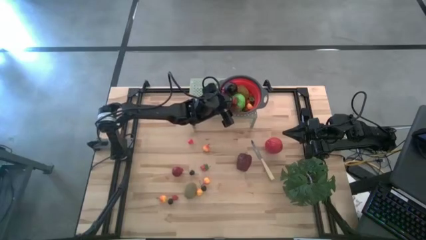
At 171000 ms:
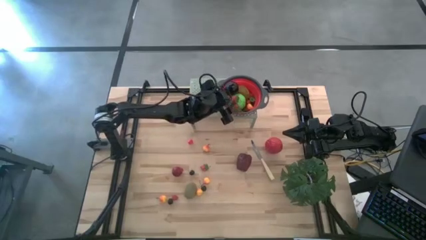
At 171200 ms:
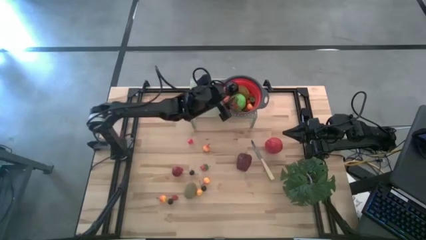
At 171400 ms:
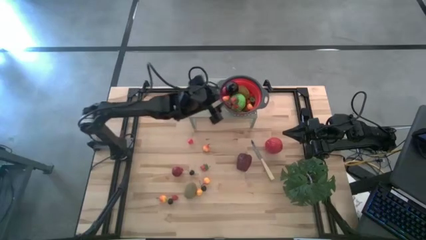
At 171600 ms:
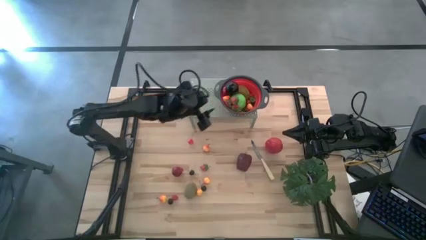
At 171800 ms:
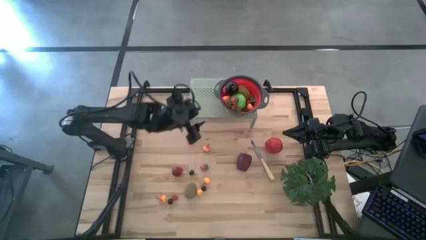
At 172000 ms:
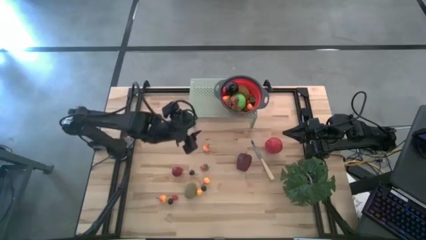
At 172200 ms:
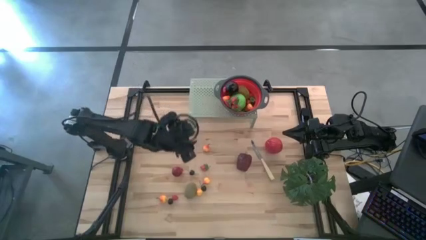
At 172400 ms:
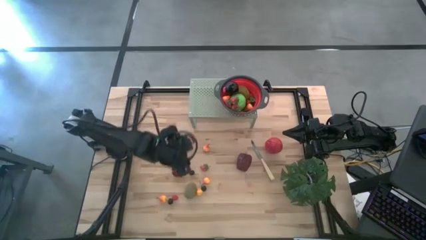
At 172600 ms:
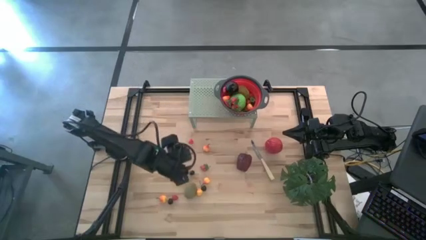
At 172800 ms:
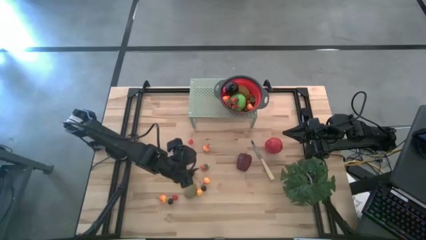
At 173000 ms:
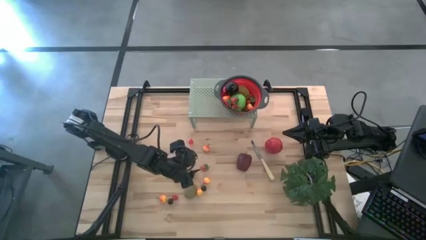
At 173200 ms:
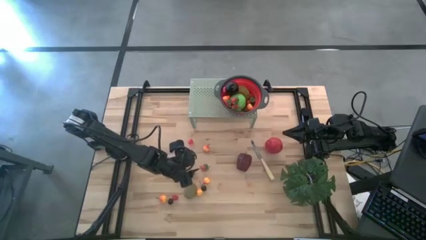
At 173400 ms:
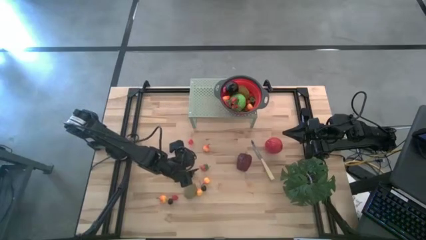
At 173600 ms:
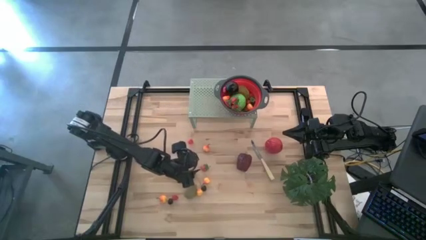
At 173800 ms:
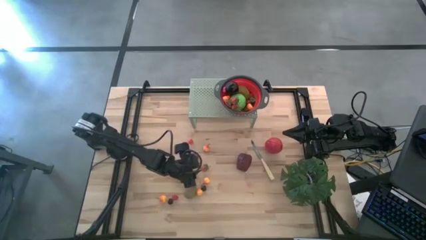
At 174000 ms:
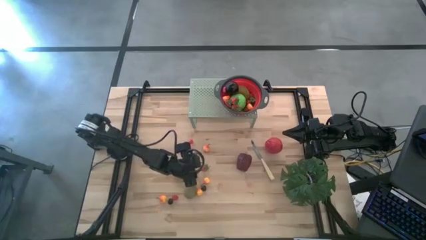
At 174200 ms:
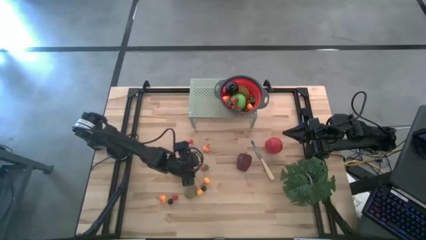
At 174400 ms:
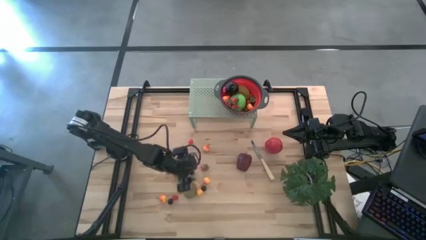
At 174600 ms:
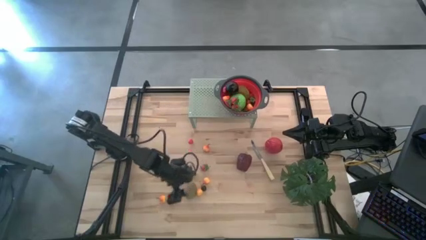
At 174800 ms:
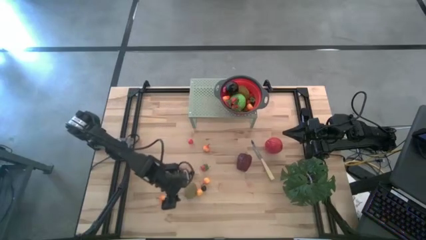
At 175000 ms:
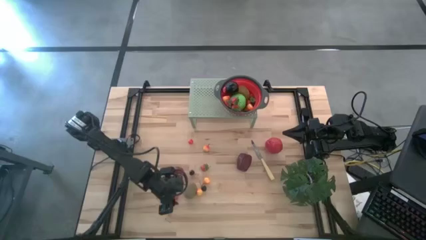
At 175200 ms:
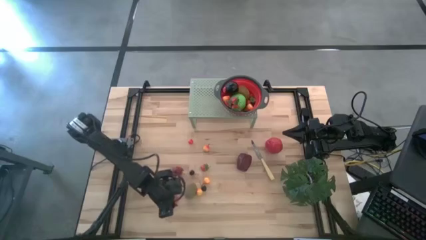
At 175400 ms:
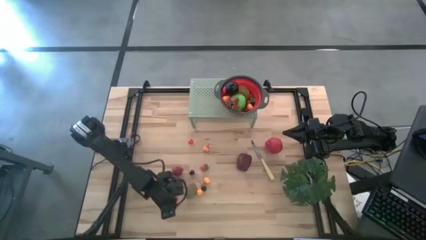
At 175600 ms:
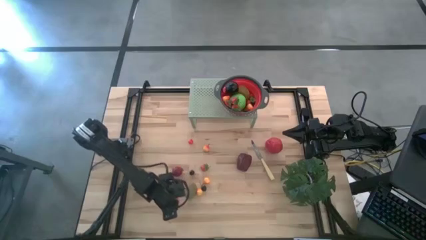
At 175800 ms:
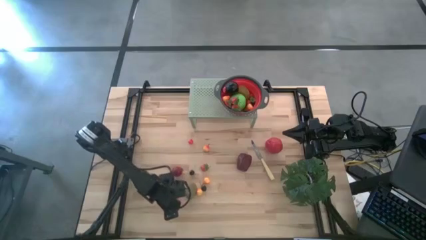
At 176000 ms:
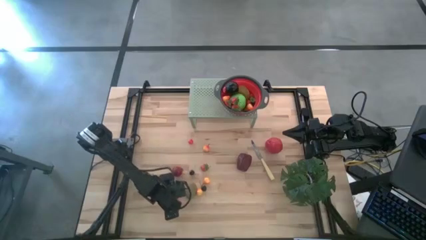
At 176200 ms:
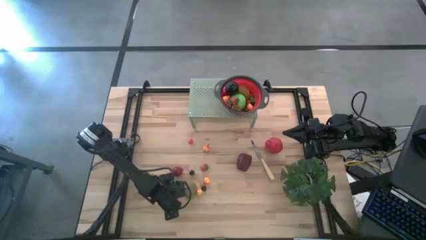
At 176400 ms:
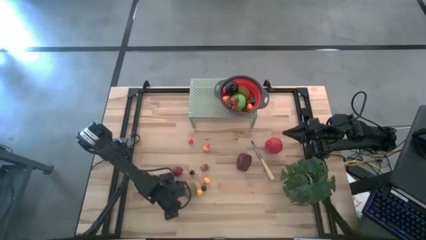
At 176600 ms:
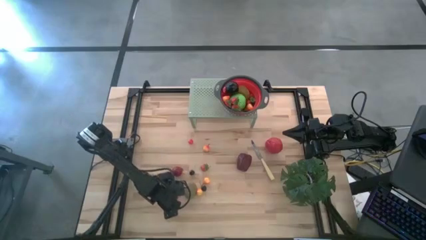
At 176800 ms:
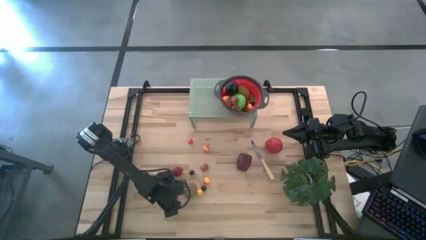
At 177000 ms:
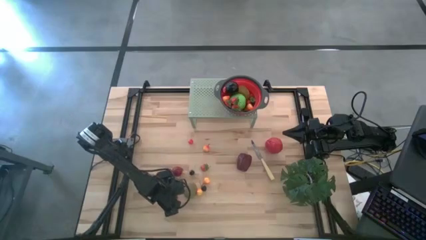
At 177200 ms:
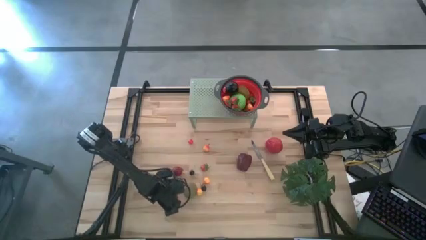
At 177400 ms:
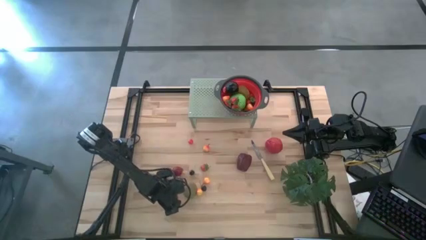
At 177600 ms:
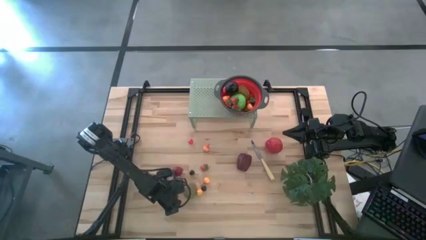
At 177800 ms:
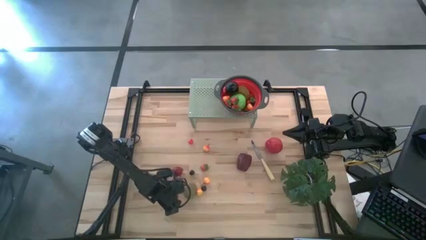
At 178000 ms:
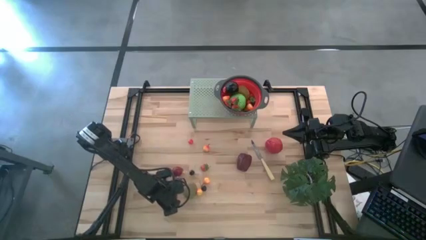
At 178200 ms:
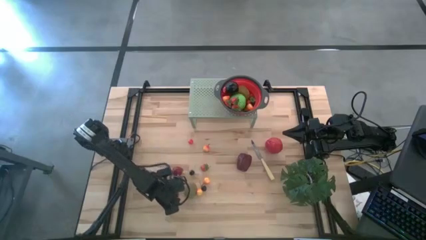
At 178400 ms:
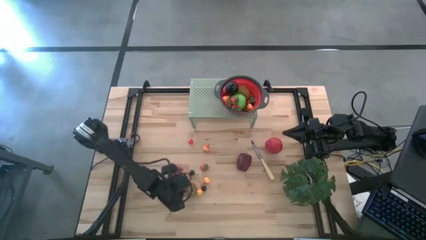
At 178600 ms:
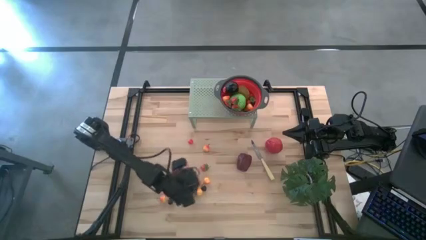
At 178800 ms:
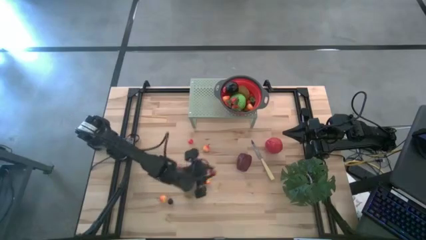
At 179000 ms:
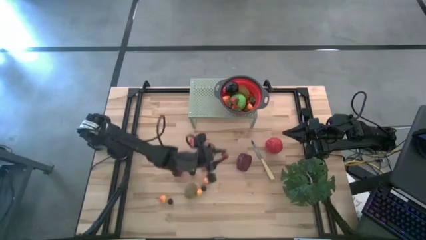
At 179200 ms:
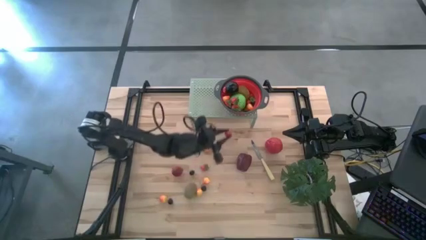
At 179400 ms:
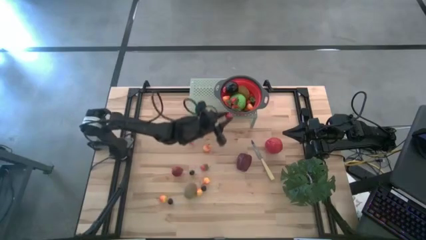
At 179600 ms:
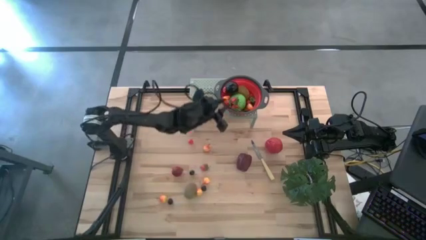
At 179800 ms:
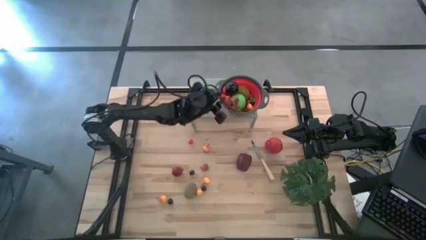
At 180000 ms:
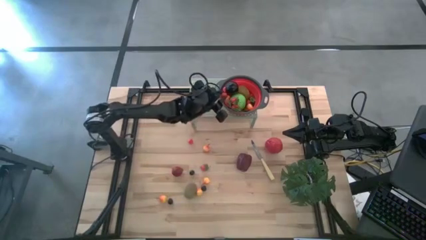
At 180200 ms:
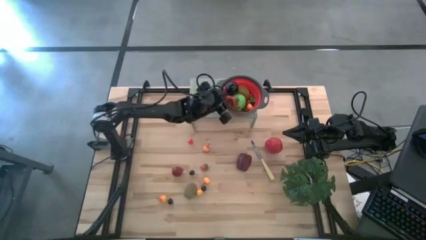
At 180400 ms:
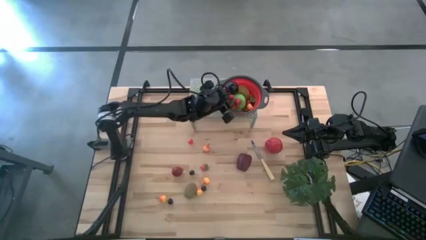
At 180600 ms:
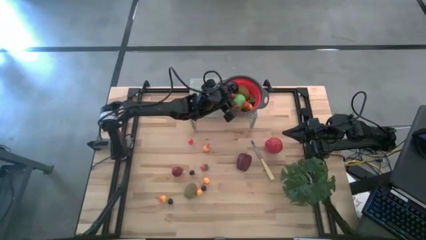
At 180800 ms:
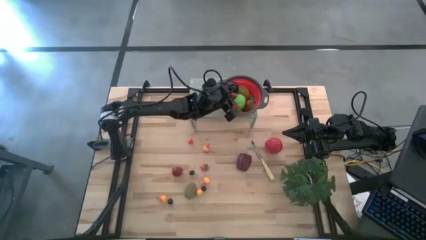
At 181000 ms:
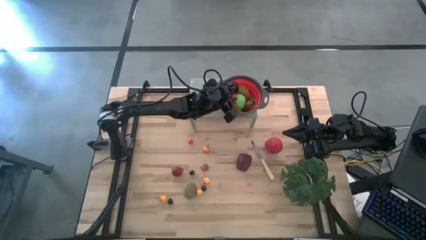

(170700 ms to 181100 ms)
Task: Pick & Place Fruit
Put the red raspberry into the black strainer bowl on the shelf

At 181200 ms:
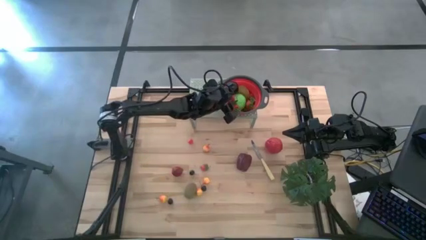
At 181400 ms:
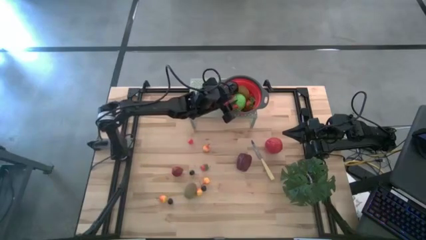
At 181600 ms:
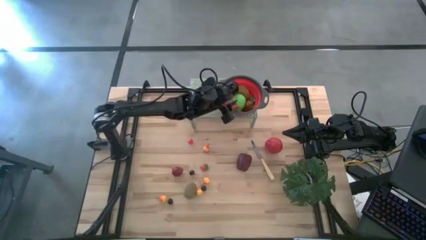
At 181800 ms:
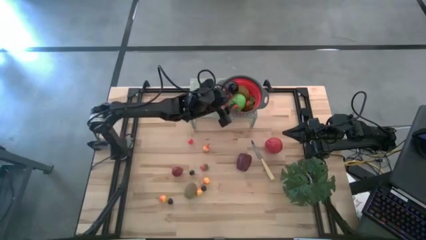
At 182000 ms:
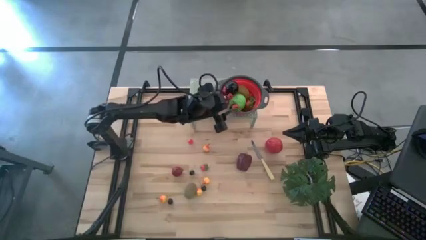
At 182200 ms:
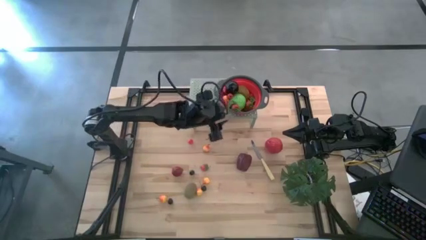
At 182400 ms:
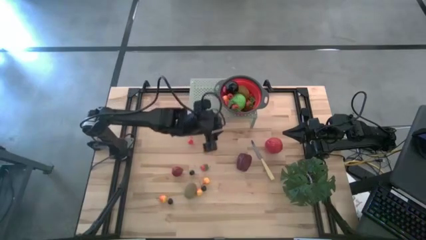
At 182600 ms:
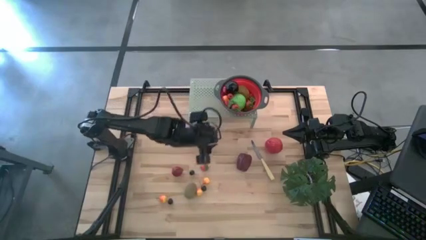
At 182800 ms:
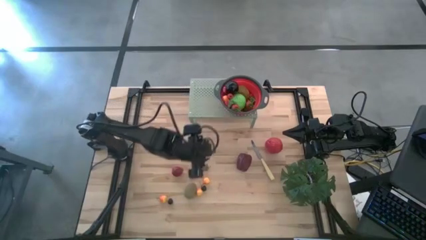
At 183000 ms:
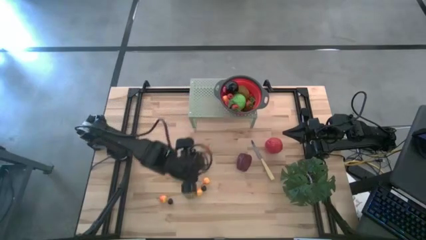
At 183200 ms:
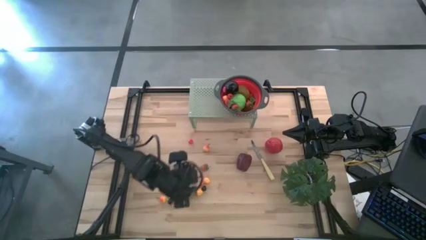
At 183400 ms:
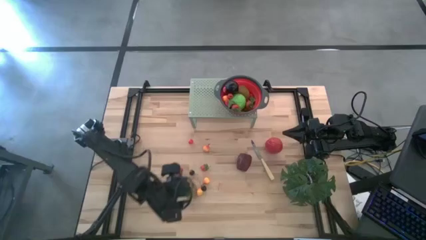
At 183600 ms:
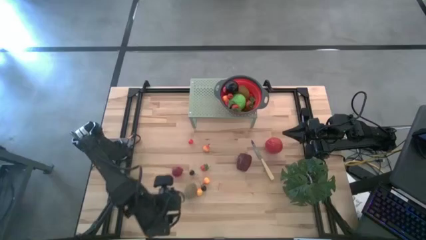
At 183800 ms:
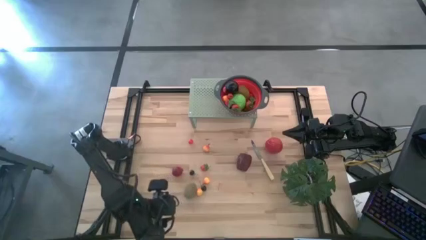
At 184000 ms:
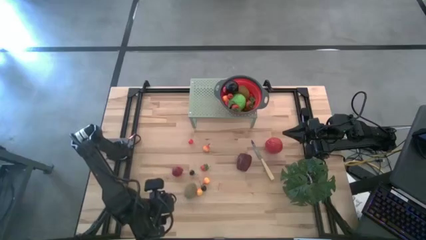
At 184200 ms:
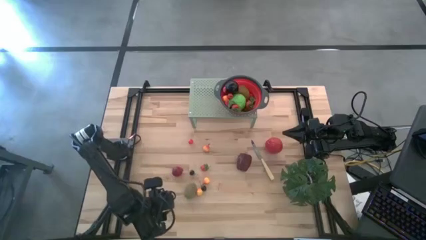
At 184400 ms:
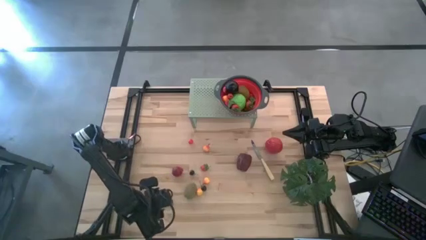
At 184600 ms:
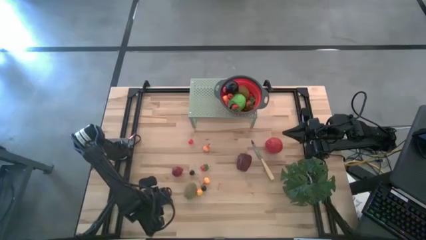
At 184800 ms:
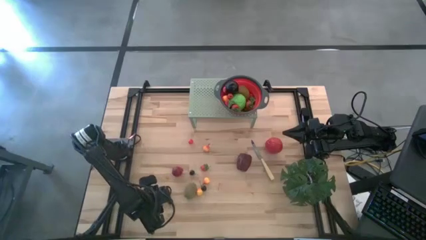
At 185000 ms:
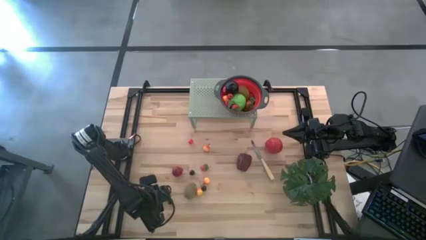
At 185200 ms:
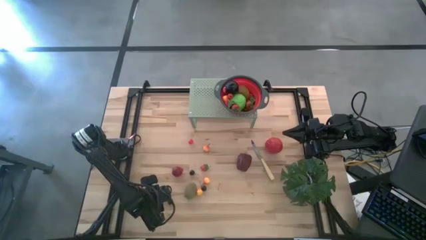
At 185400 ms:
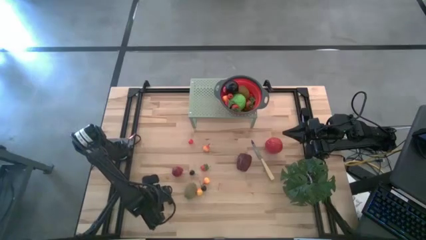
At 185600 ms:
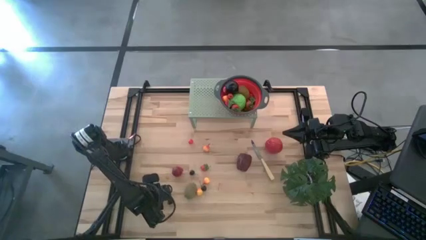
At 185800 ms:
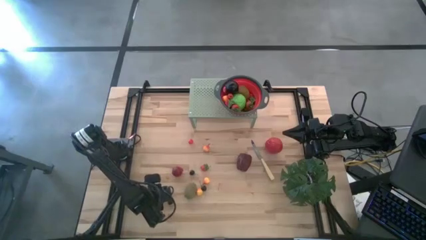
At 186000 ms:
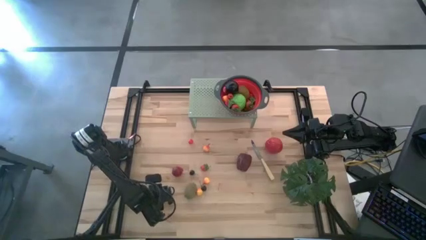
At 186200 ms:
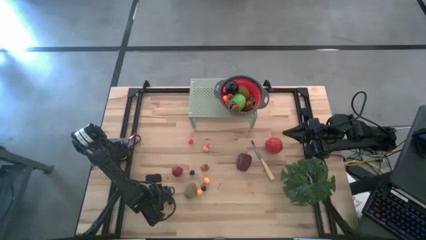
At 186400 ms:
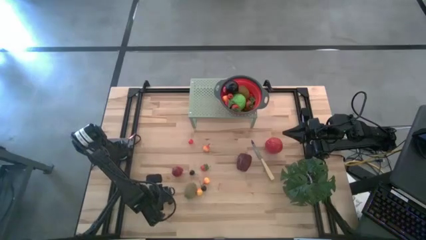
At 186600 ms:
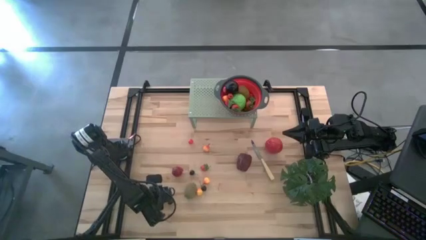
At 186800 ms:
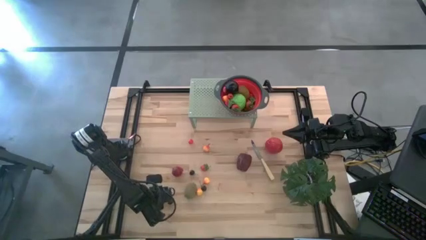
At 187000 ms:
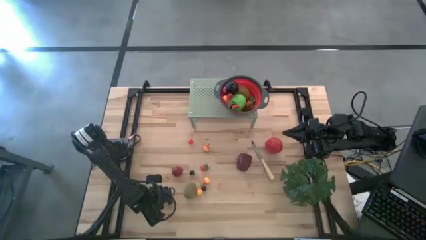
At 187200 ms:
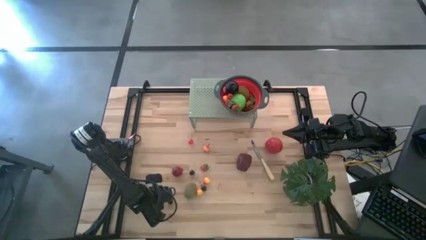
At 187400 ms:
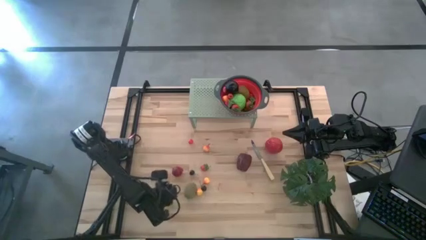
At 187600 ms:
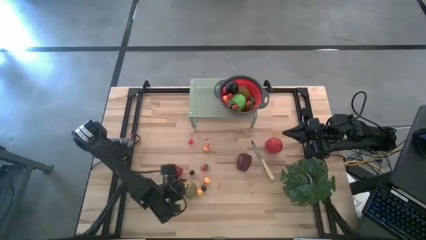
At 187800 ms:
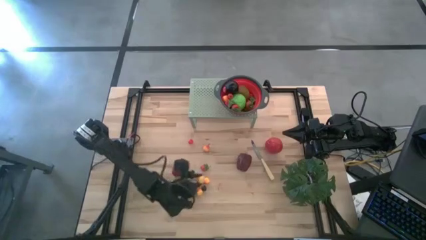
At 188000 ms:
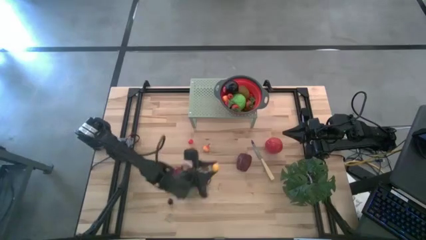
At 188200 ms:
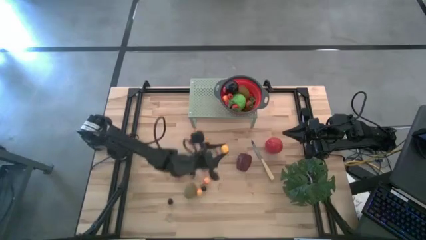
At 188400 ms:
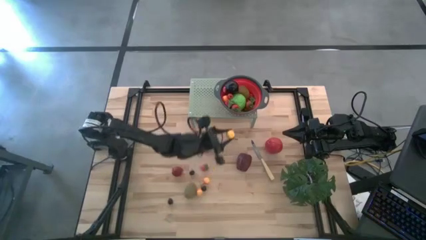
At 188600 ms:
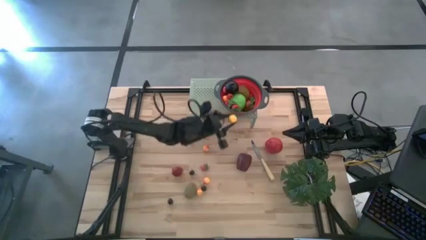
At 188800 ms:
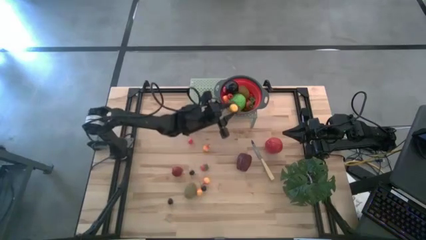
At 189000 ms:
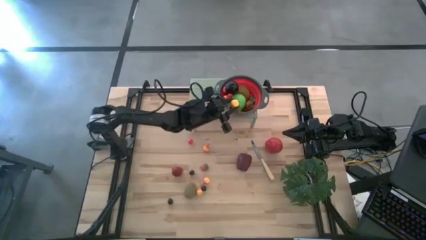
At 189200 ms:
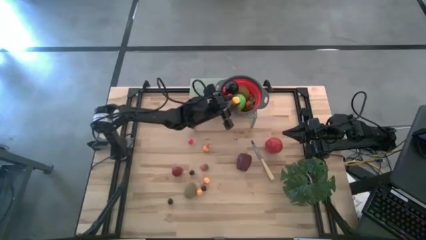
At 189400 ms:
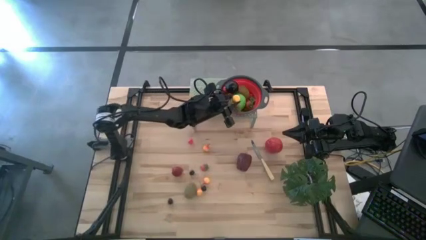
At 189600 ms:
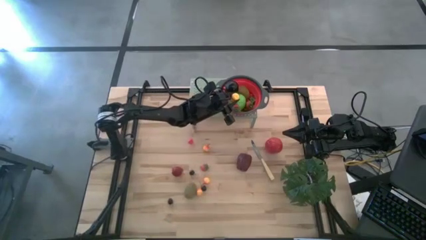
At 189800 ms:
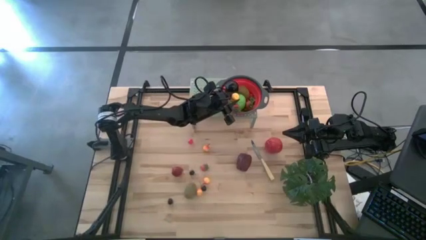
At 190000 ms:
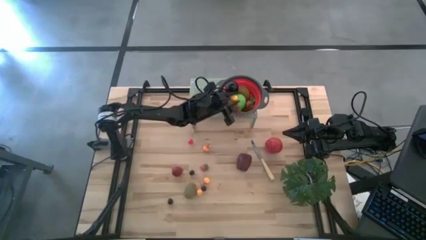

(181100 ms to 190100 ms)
Put the orange peach into the black strainer bowl on the shelf
